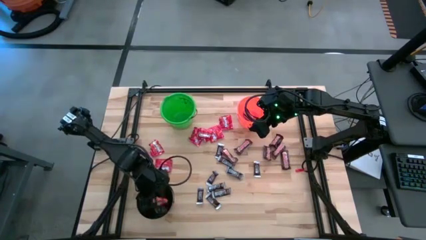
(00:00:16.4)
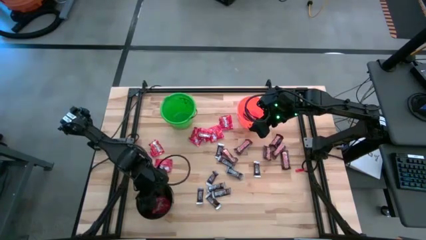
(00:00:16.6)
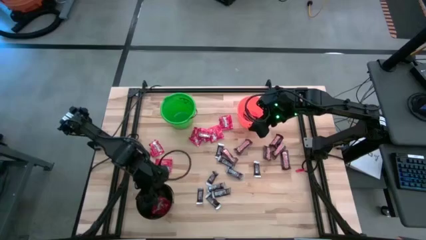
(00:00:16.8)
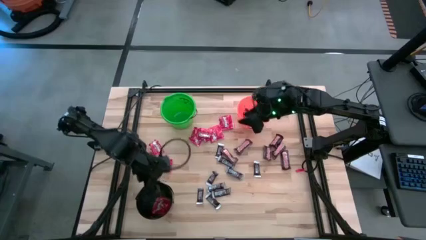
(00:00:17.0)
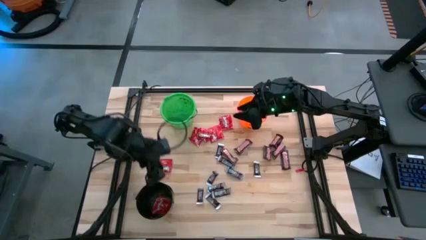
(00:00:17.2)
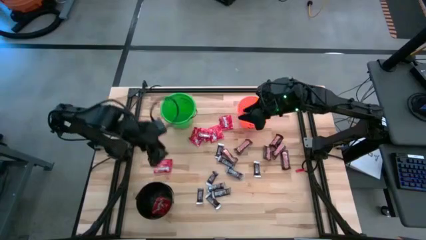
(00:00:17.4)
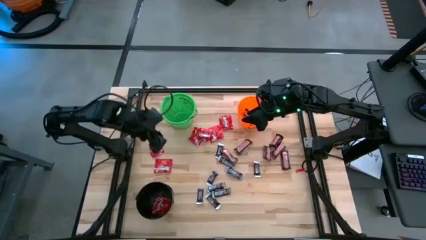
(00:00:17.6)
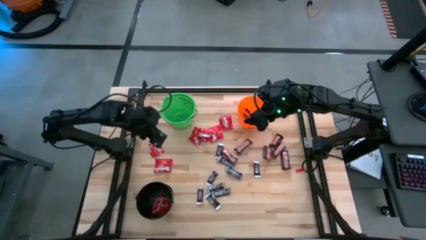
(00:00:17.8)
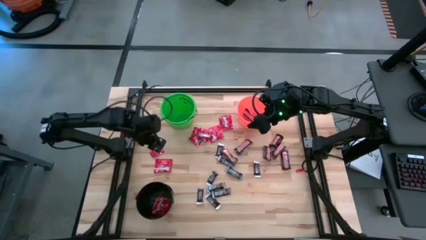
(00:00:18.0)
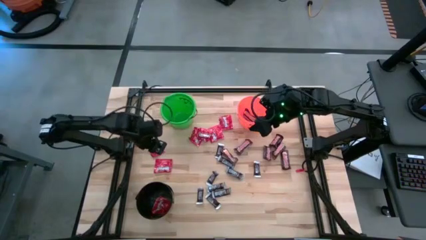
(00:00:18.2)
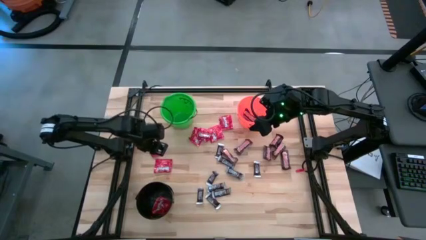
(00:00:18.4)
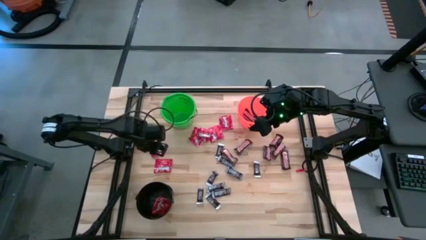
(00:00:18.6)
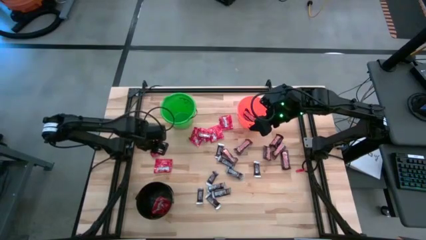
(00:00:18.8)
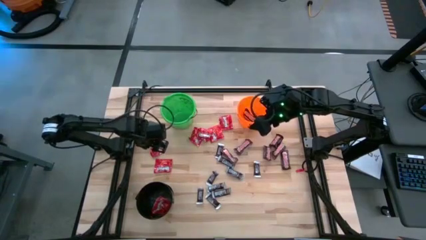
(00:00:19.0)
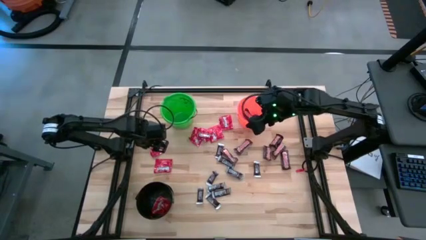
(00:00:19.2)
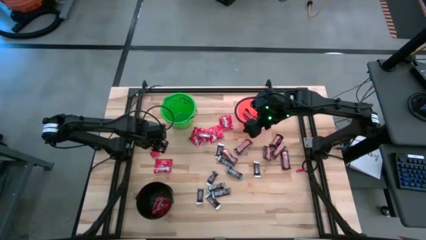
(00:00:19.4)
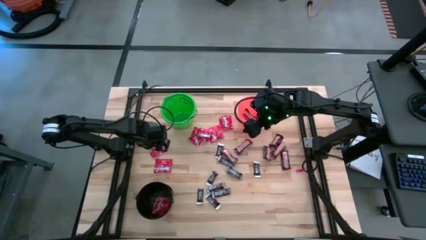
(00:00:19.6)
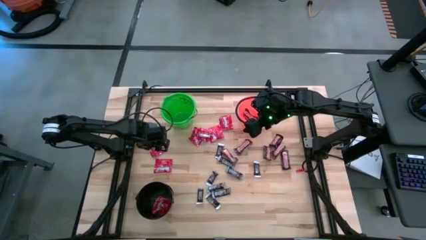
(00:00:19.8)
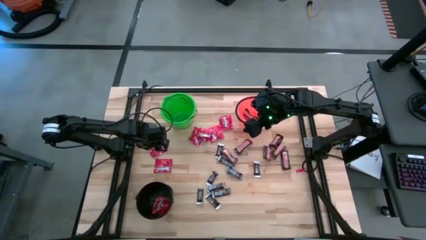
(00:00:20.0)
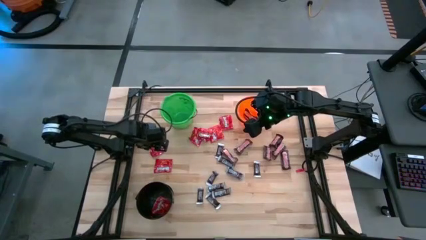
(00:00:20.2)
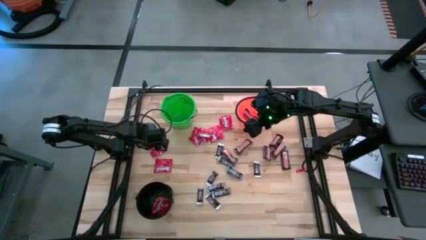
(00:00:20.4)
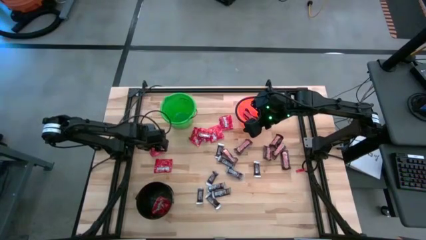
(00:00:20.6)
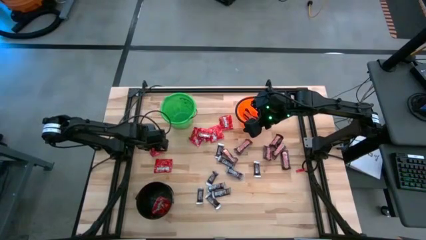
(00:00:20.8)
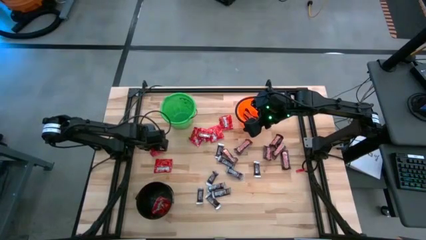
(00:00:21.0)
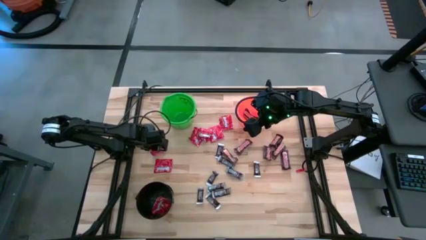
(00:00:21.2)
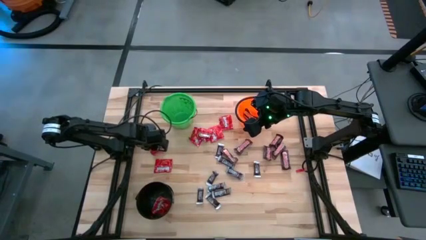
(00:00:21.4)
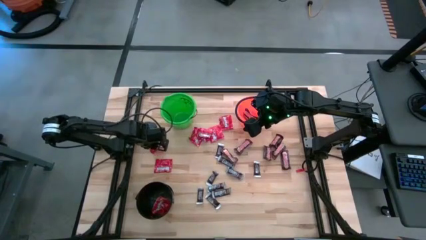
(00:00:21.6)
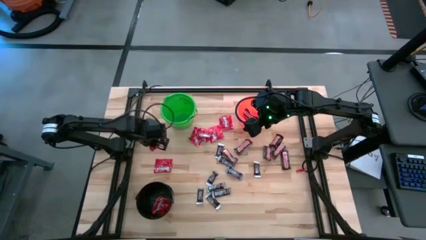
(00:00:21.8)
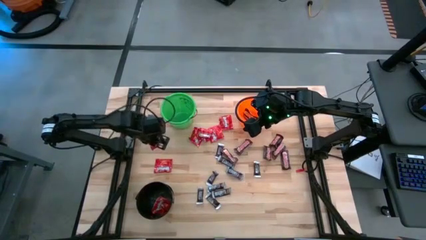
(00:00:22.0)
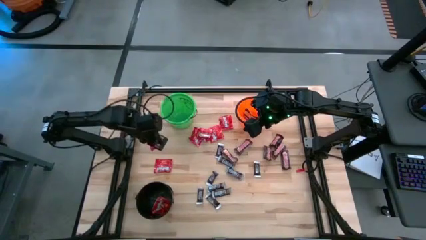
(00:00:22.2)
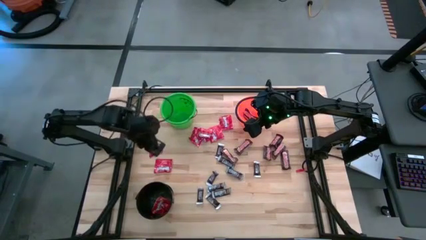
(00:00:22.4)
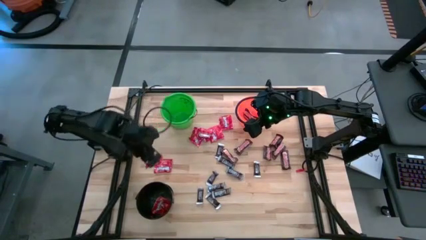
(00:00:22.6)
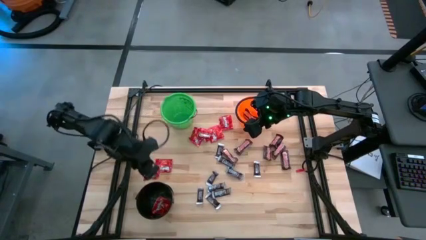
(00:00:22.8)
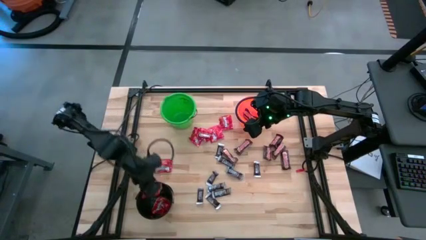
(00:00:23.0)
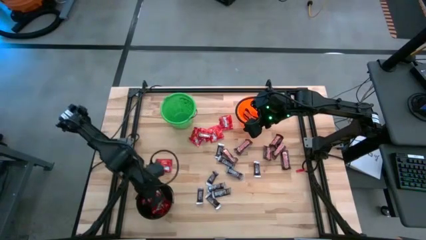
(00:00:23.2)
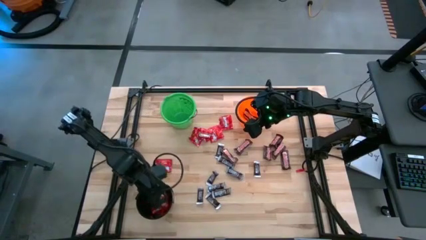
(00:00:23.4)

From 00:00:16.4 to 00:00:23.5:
Task: Sort candy
Put the red candy into the black bucket

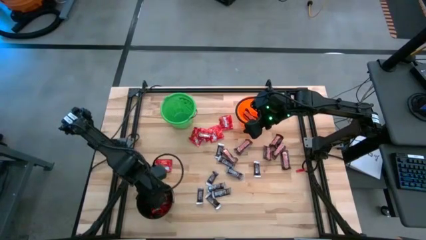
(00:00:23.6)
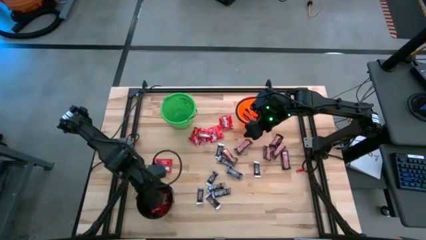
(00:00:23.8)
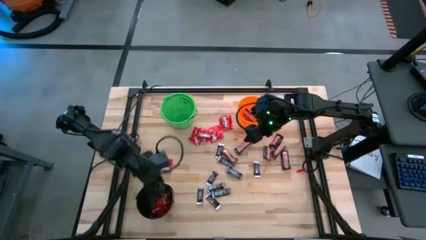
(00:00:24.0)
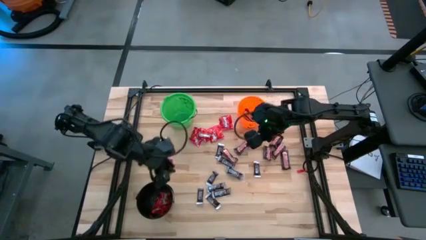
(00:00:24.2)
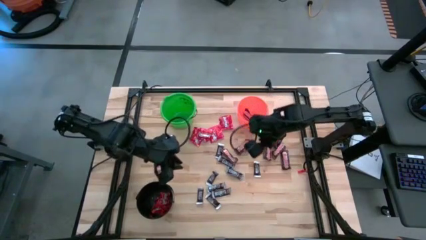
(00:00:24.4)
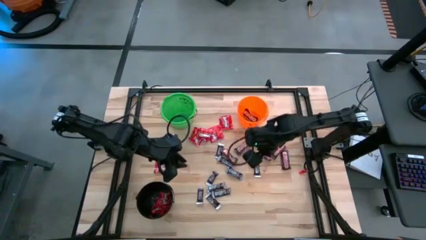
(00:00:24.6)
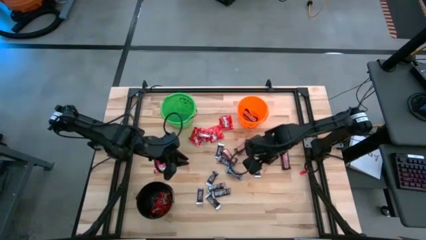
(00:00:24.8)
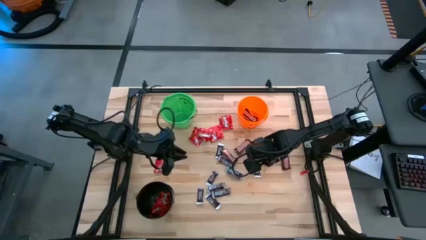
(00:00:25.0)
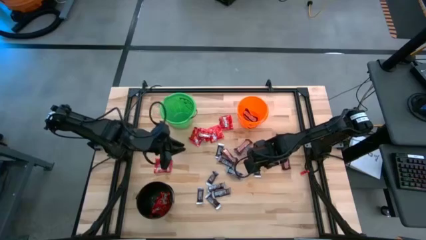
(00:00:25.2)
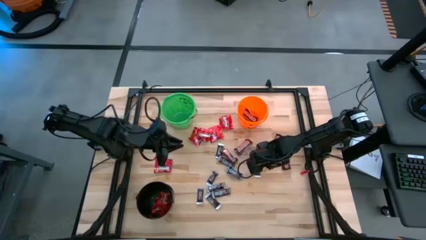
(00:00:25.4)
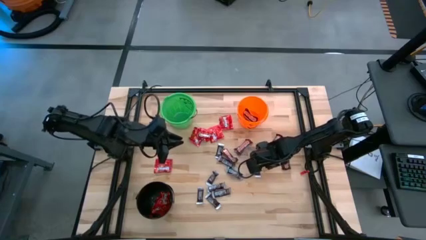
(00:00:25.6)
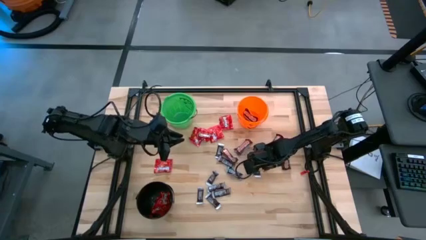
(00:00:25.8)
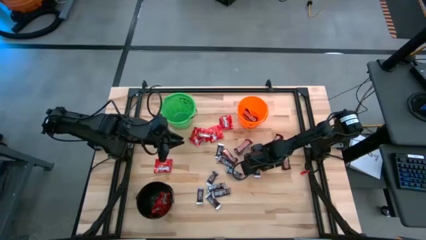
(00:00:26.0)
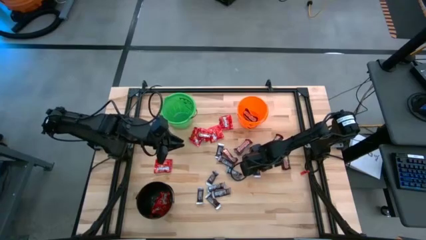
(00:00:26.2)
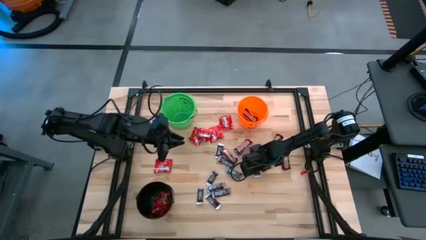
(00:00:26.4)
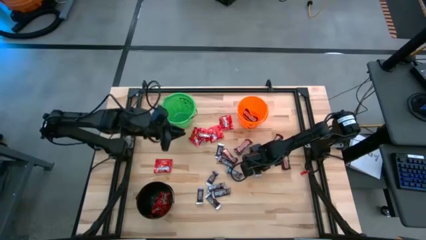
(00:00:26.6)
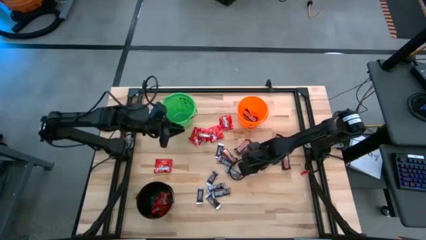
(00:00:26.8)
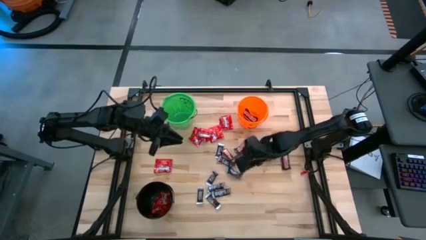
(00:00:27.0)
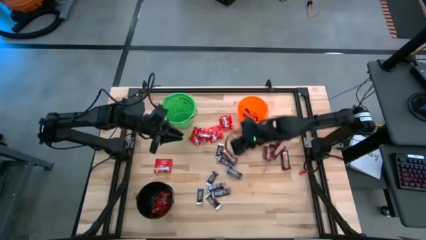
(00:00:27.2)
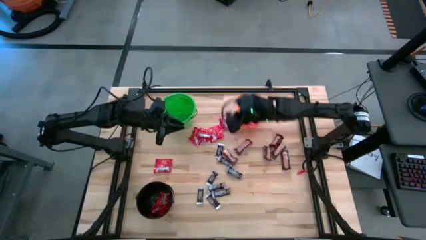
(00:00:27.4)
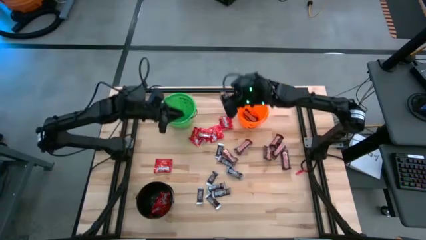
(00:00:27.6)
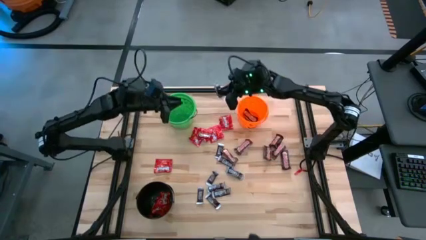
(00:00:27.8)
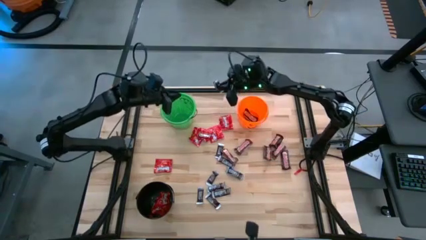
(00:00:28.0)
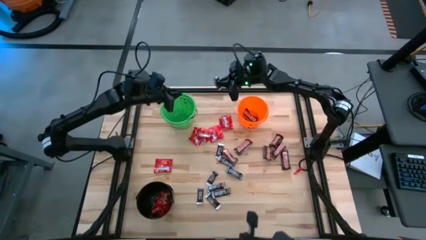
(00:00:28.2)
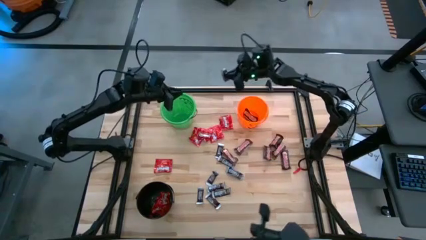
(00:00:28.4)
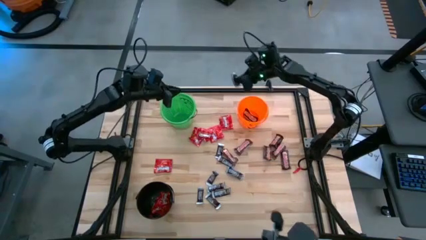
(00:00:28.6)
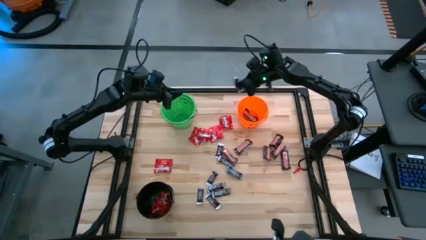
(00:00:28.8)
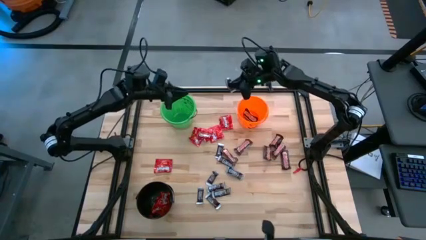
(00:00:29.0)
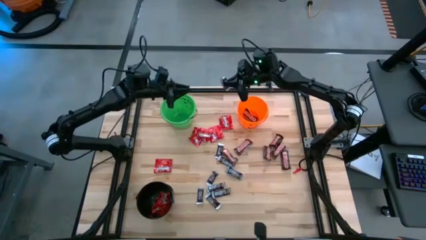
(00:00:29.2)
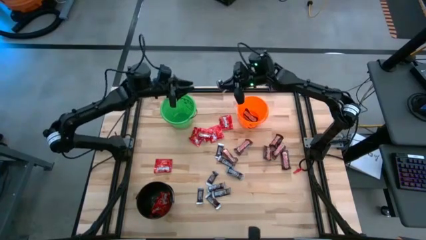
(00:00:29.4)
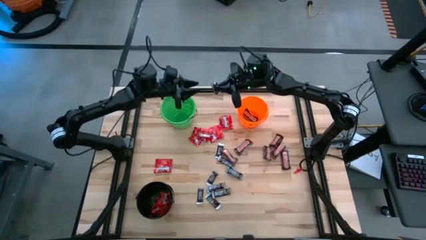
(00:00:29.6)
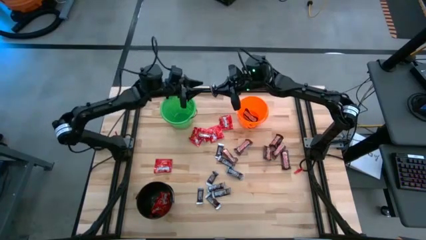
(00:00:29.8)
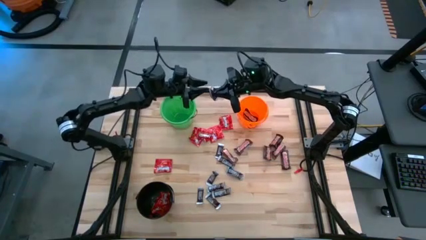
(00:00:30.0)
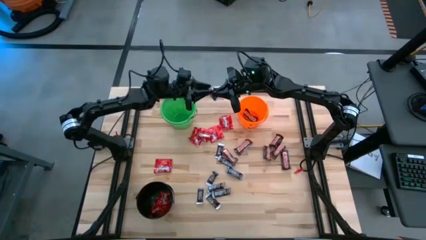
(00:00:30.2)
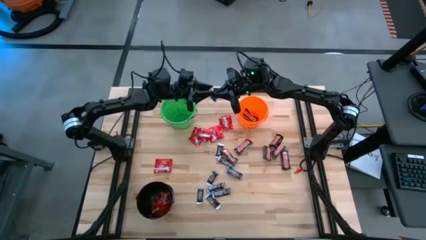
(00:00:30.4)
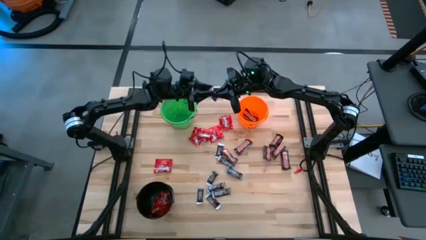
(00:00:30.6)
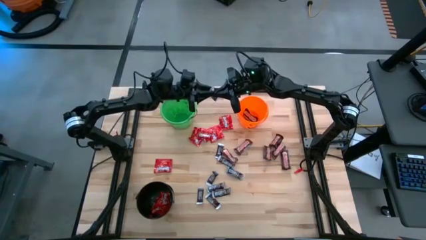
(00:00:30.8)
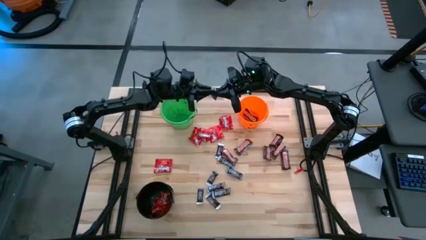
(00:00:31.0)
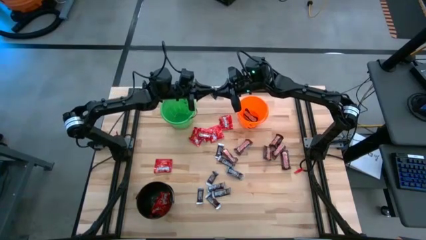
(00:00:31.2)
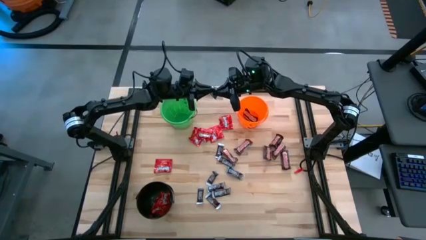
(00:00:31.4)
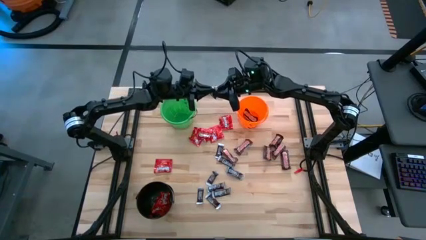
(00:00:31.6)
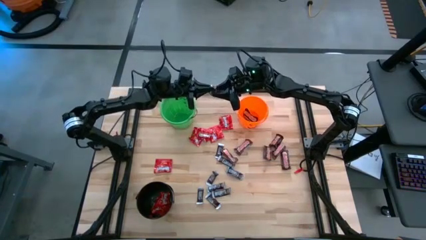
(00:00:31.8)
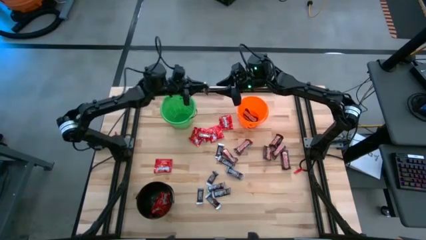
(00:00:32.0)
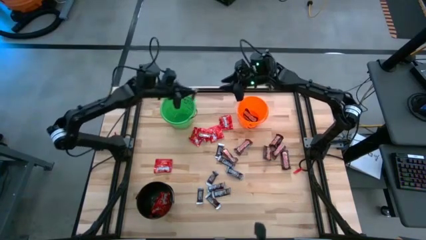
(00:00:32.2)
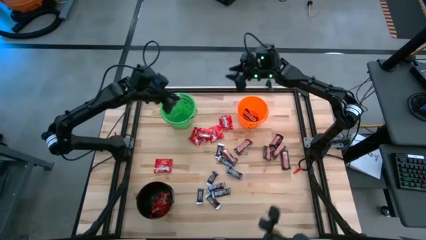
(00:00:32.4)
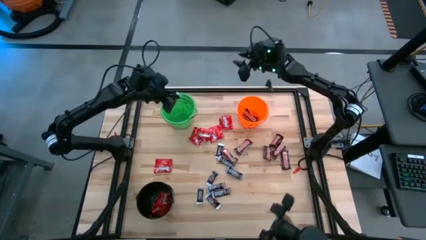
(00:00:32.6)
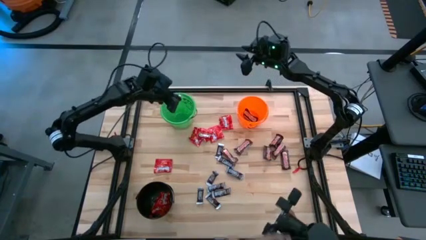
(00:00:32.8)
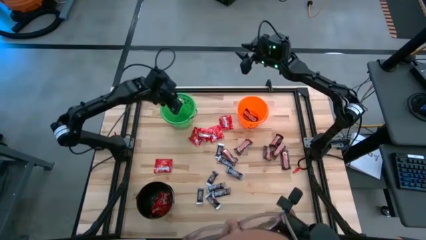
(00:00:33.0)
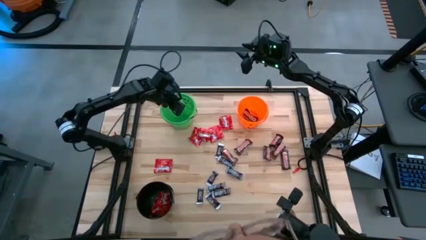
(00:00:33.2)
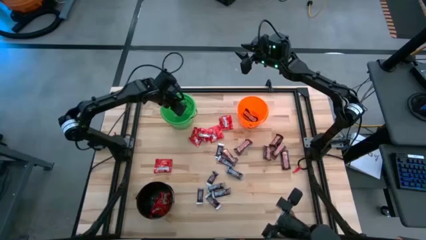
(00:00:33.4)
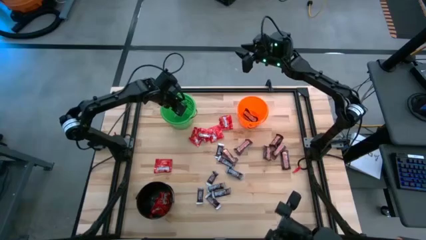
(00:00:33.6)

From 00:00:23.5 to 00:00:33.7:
Put the black chocolate into the green bucket
